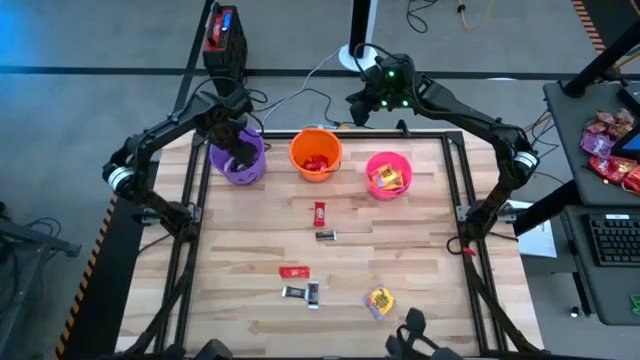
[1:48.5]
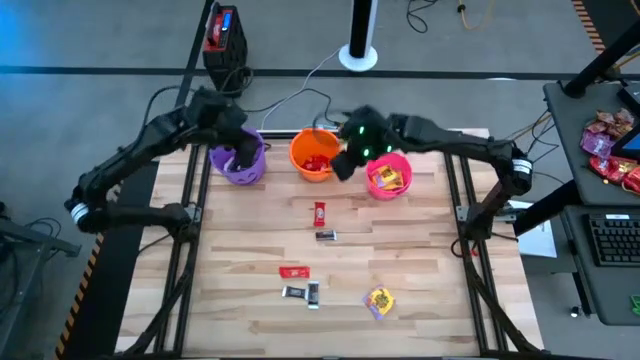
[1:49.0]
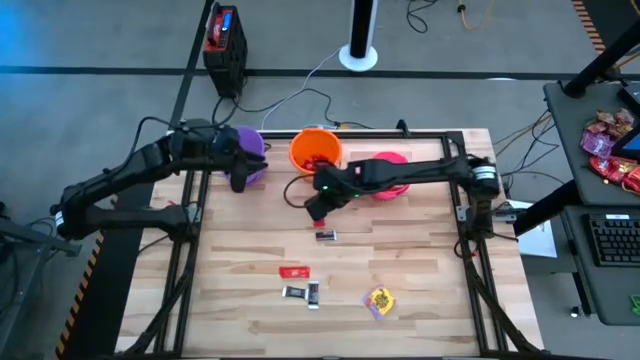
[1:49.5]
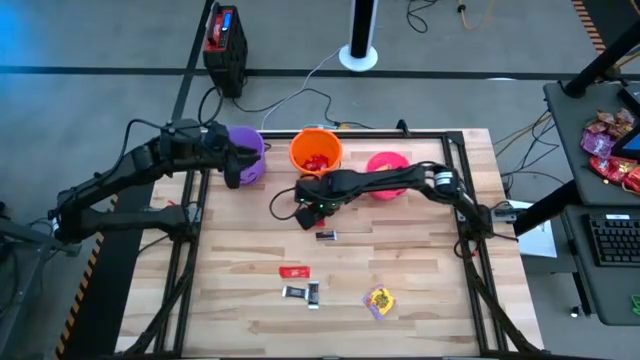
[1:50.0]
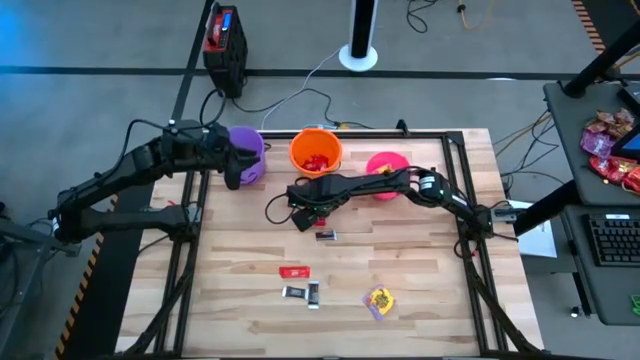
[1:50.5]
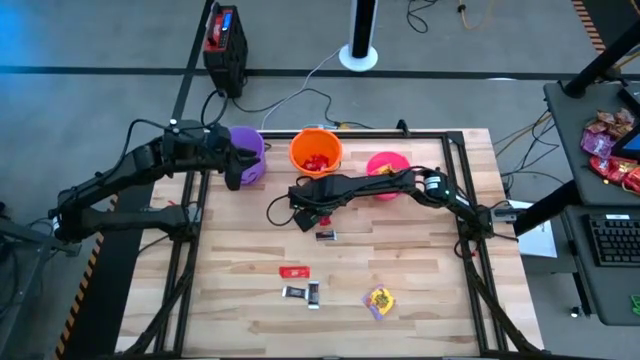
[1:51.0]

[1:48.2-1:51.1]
Task: Sort candy by brand, put in halloween buckets
Put the red candy into the orange bucket

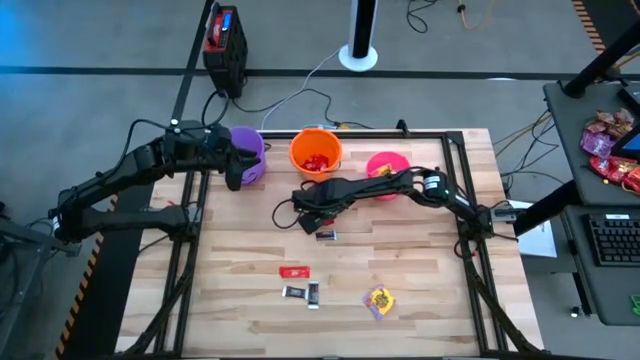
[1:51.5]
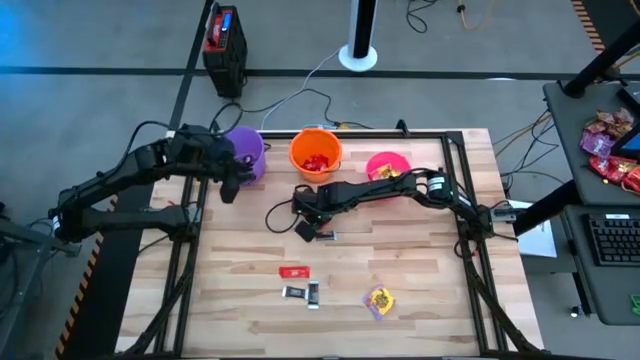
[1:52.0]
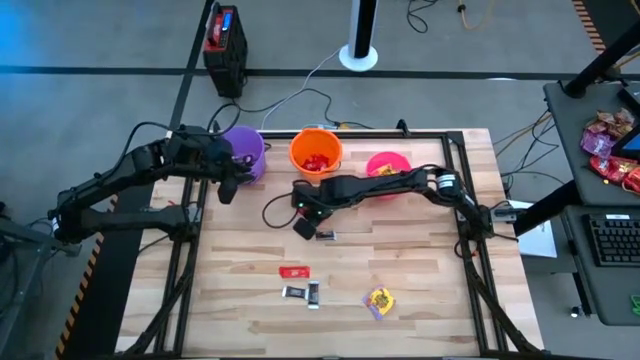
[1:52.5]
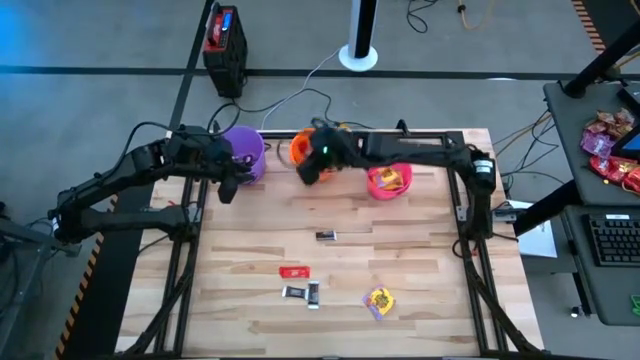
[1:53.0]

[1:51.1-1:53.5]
Put the red candy into the orange bucket

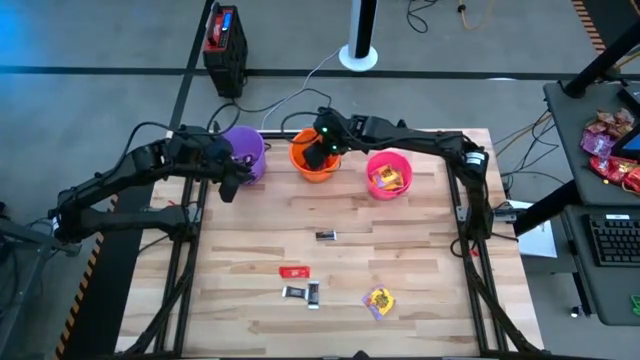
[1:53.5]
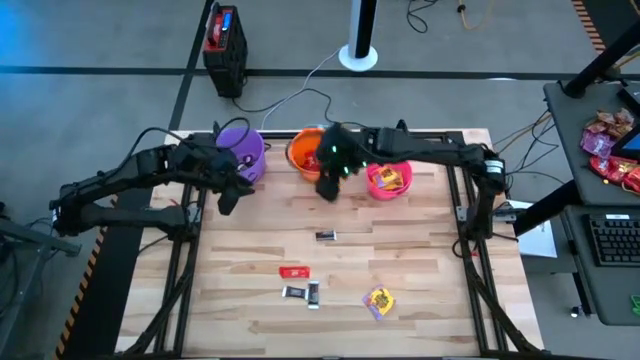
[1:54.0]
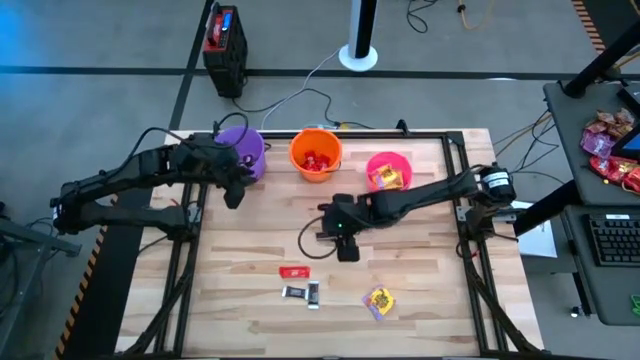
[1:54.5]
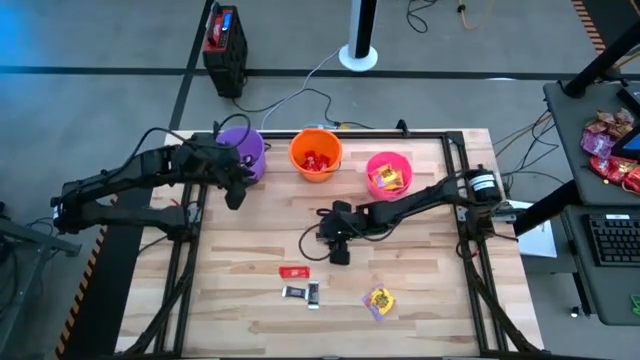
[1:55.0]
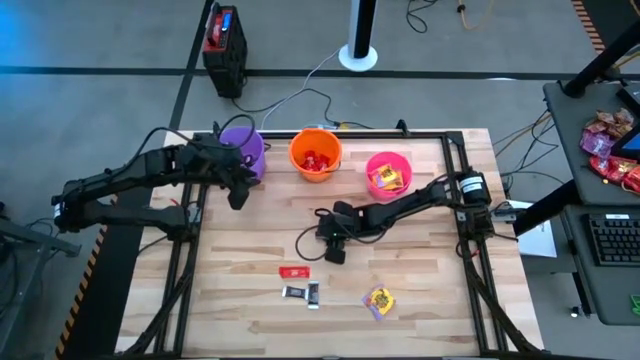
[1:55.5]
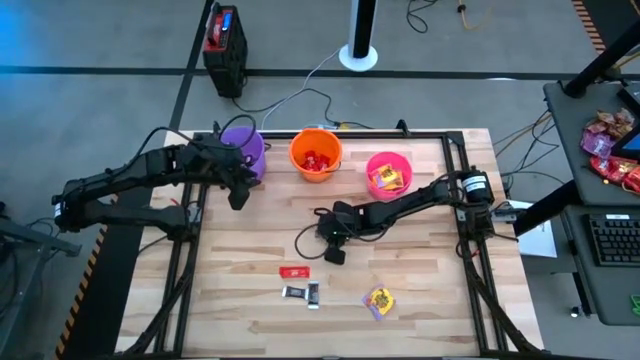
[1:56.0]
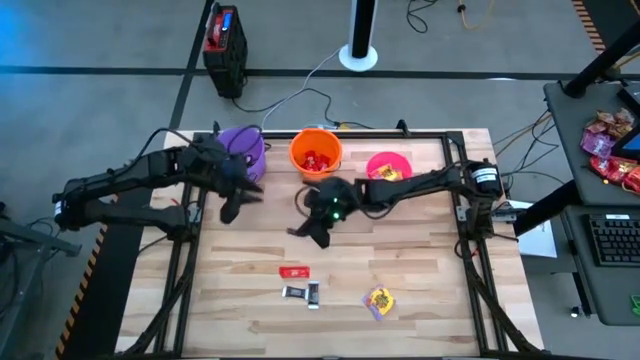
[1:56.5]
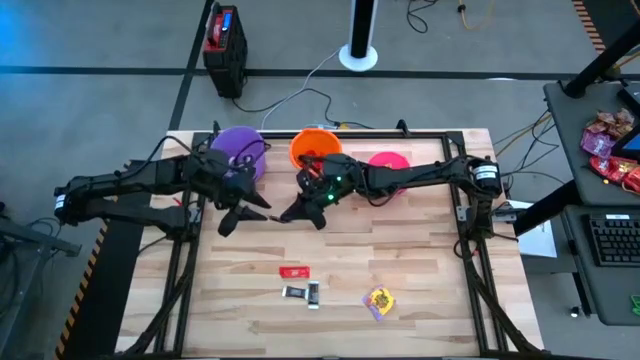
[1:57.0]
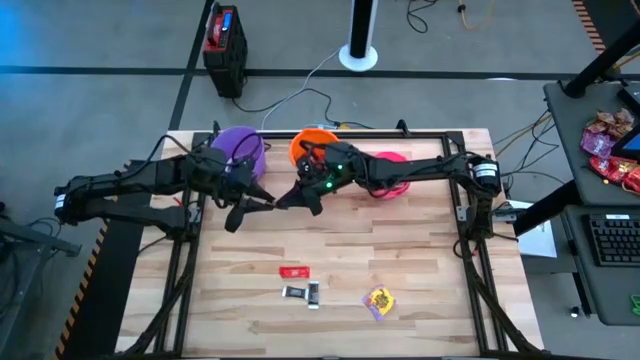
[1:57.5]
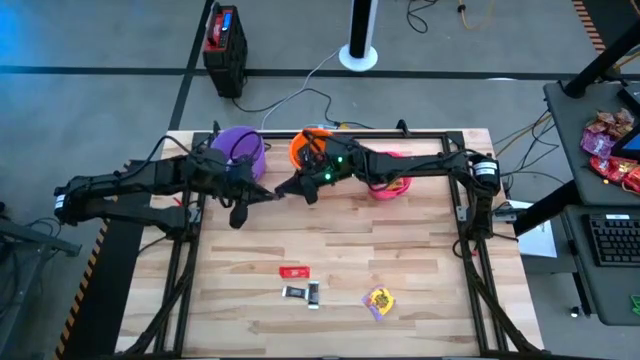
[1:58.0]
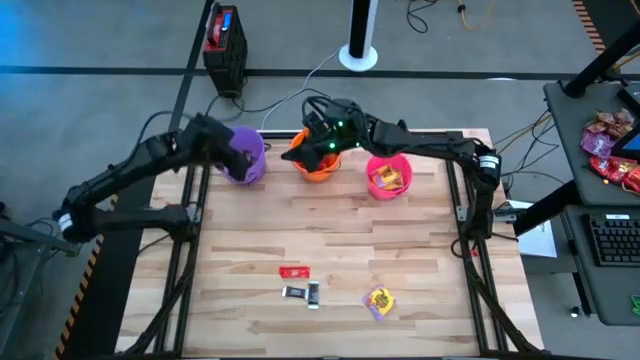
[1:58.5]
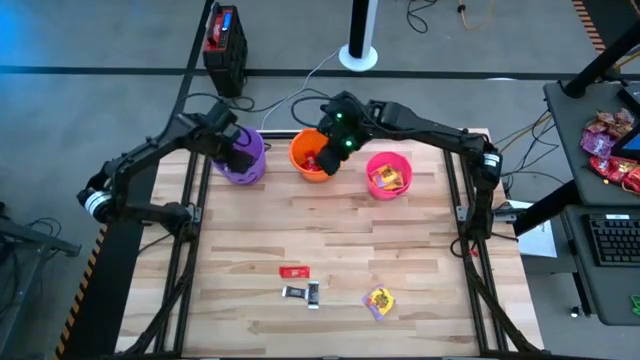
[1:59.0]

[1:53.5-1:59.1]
Put the black candy into the violet bucket

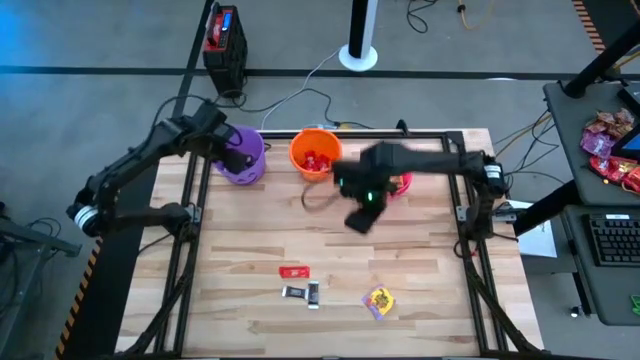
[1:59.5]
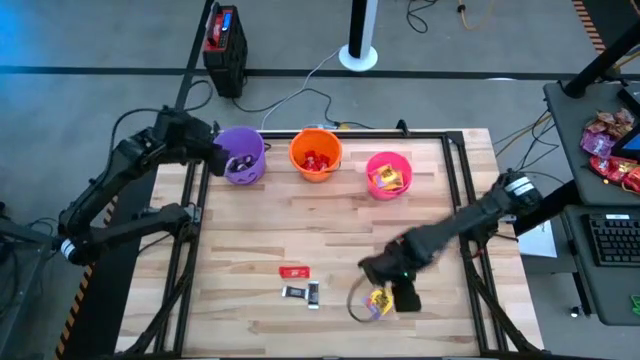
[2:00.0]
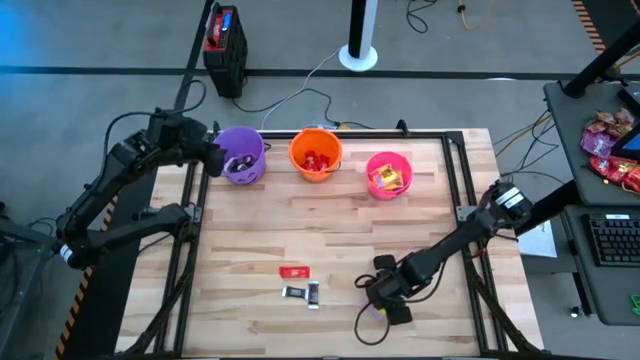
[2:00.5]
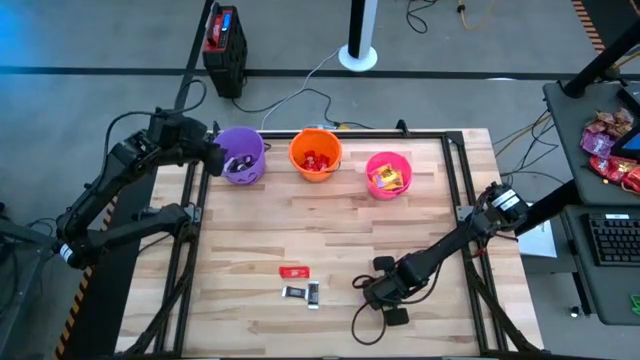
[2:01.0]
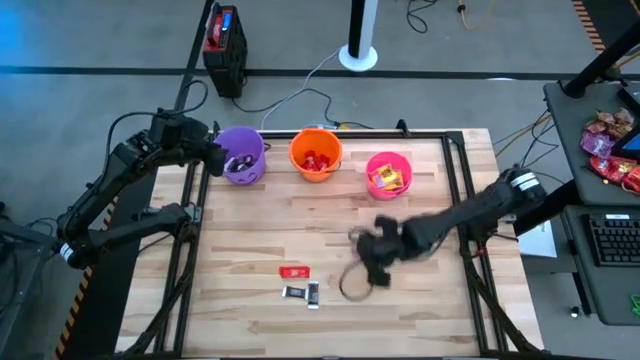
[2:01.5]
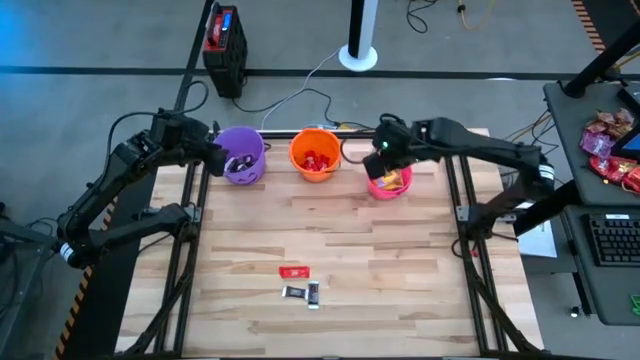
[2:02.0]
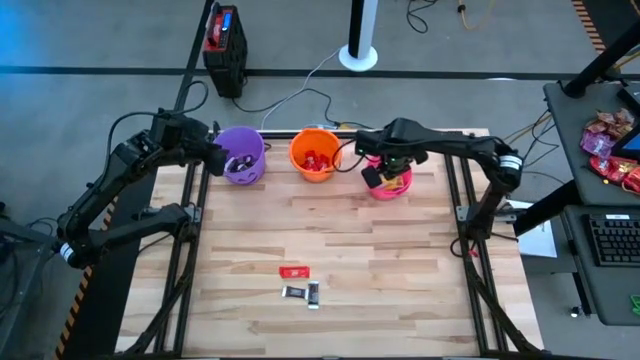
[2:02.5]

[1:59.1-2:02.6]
Put the yellow candy into the pink bucket

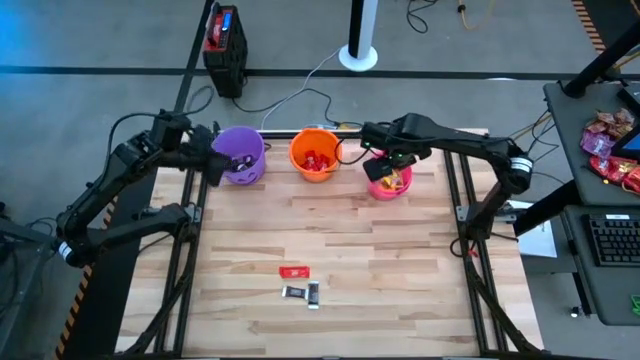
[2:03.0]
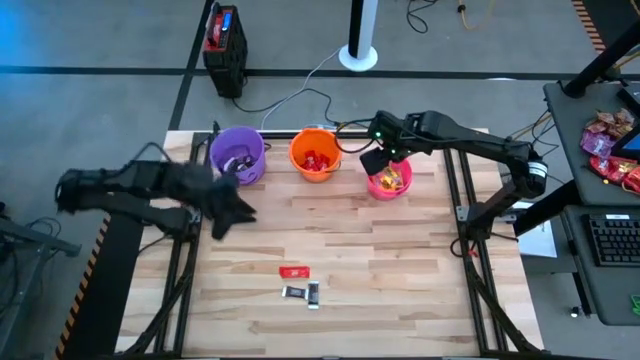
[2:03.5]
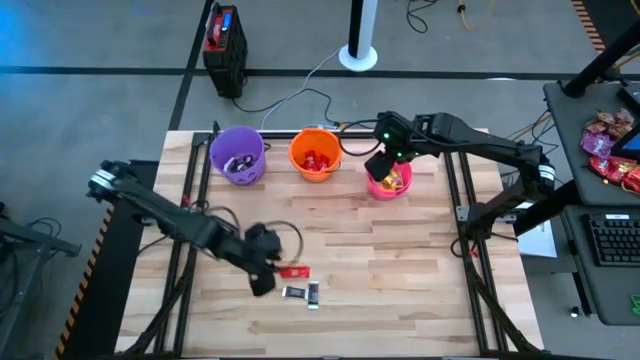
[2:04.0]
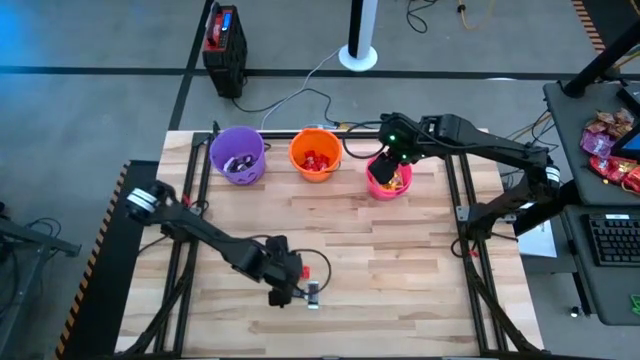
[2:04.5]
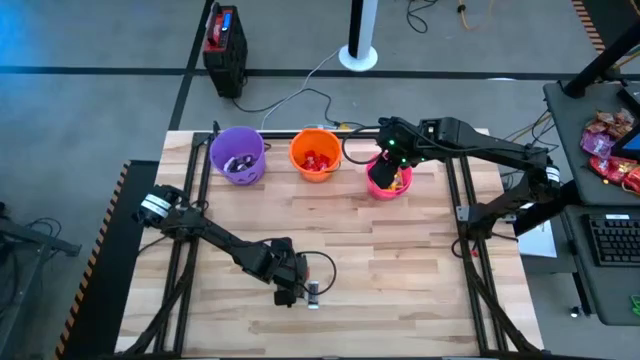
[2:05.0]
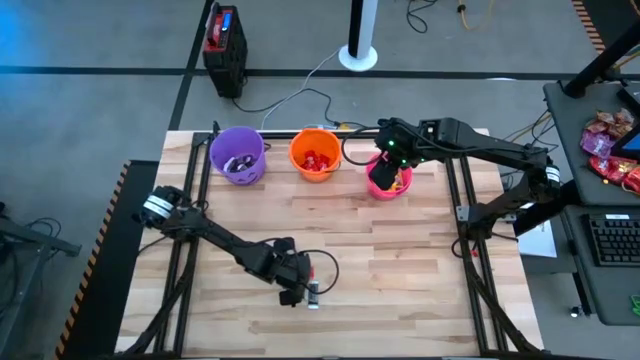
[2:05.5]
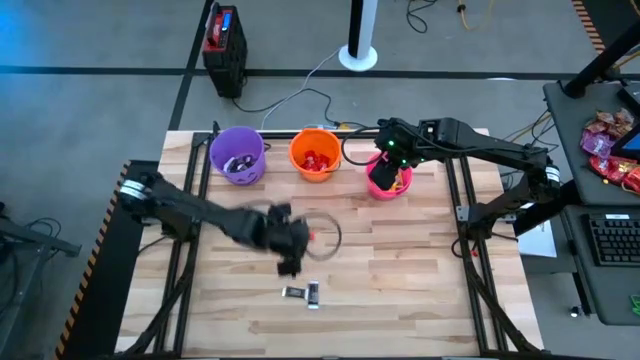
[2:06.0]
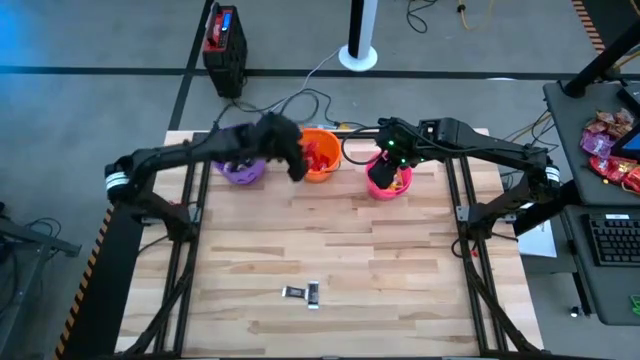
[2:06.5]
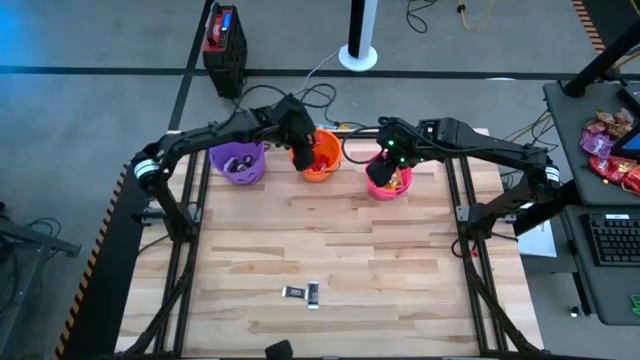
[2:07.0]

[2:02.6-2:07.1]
Put the red candy into the orange bucket

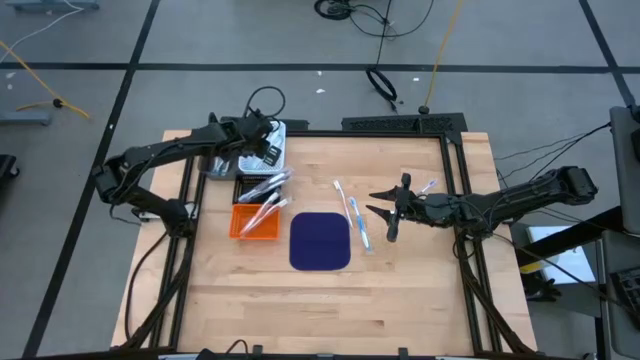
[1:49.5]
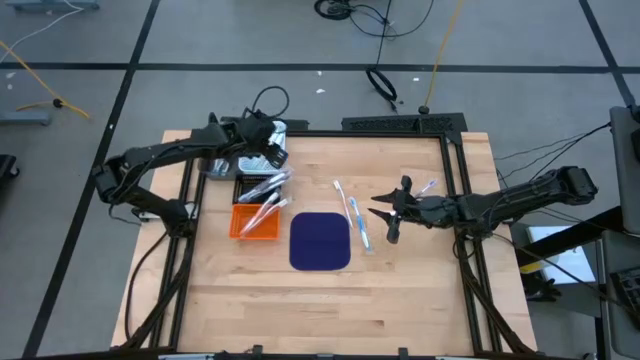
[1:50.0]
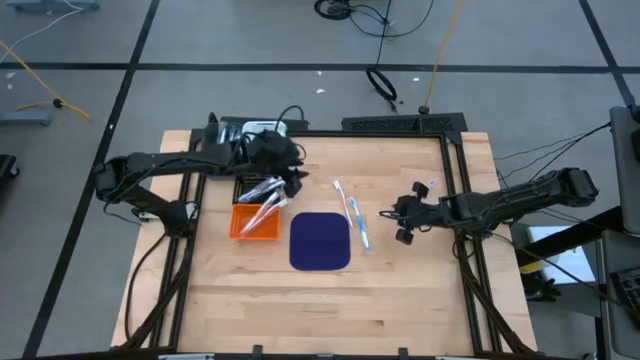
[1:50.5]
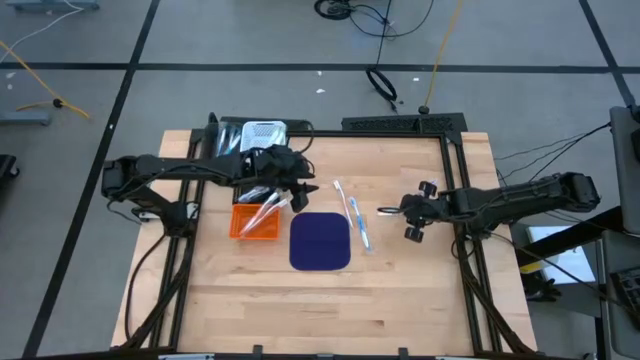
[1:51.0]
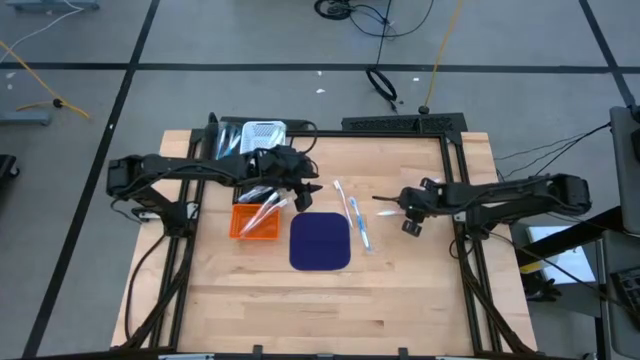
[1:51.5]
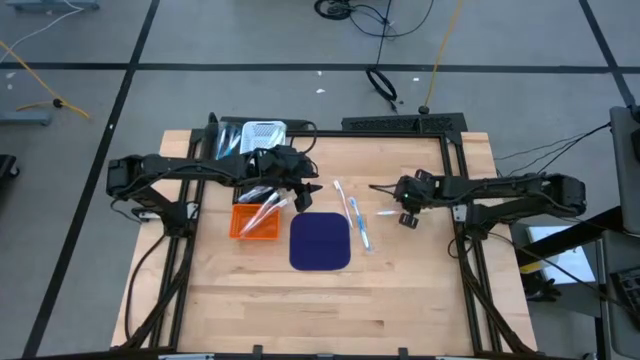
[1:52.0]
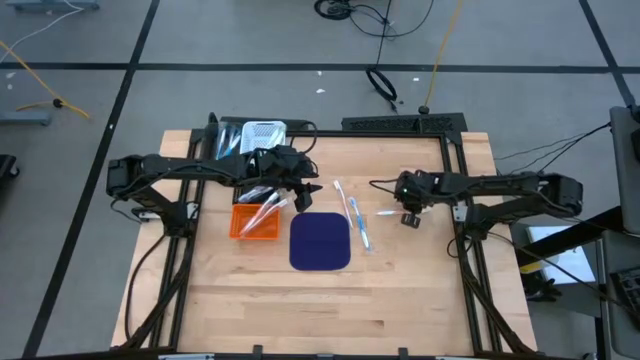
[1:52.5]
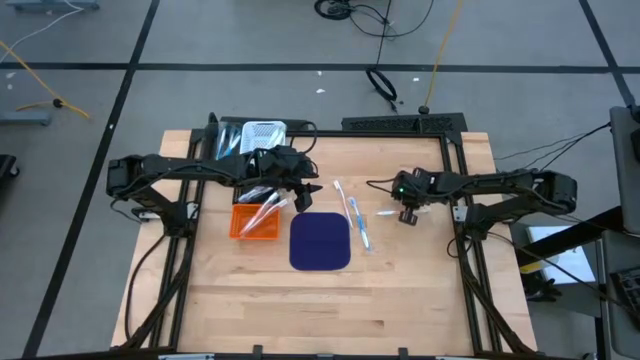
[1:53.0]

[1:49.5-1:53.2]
Task: Pick & Place Toothbrushes
Put the violet toothbrush into the black bin
